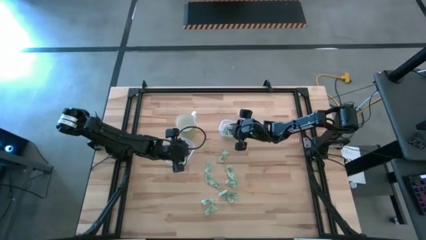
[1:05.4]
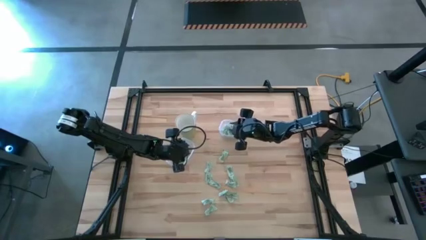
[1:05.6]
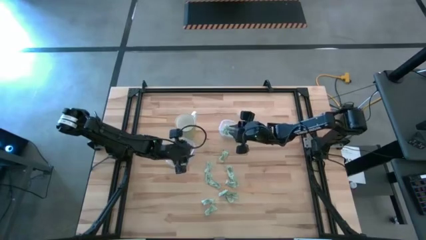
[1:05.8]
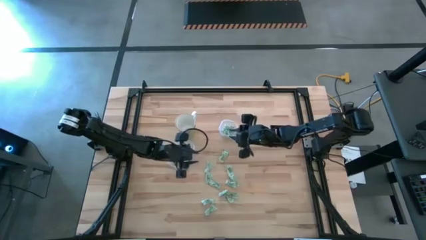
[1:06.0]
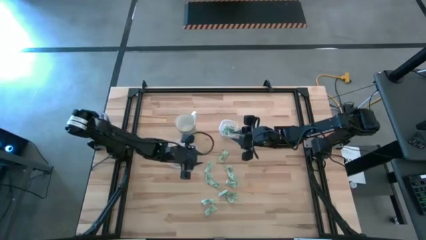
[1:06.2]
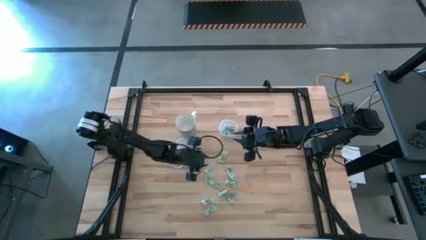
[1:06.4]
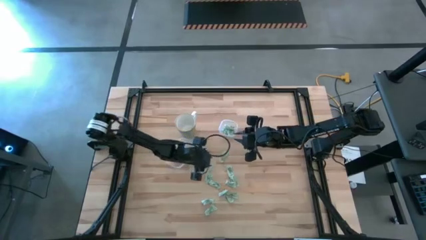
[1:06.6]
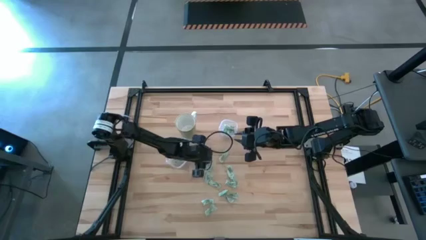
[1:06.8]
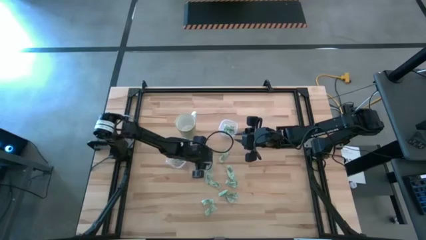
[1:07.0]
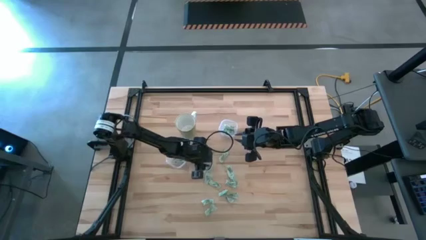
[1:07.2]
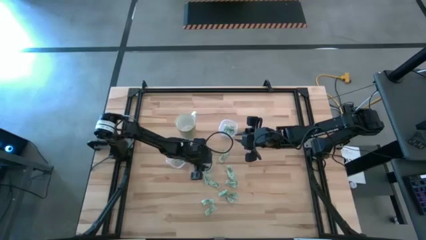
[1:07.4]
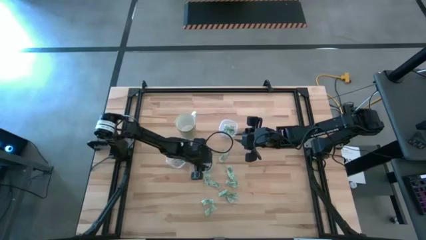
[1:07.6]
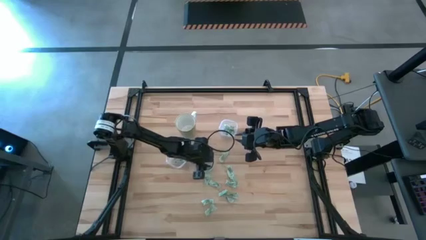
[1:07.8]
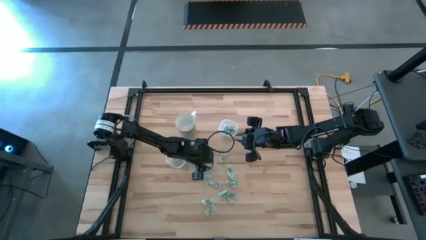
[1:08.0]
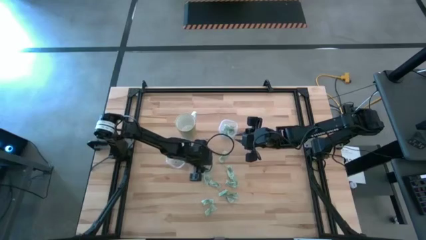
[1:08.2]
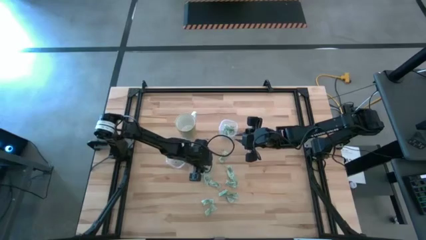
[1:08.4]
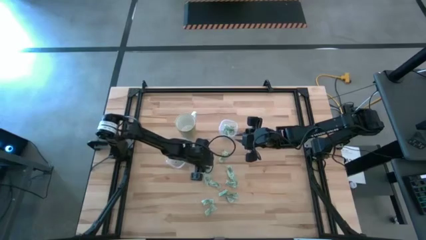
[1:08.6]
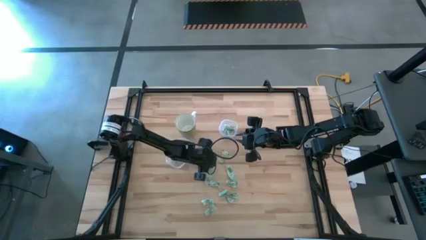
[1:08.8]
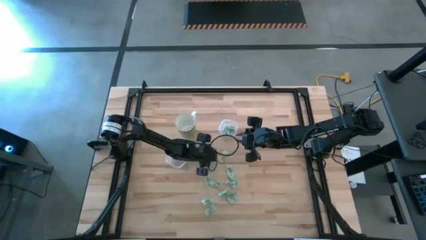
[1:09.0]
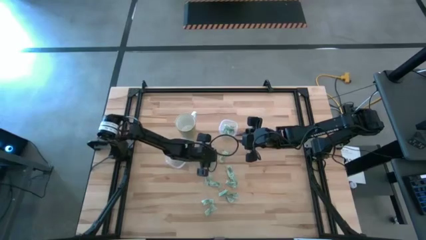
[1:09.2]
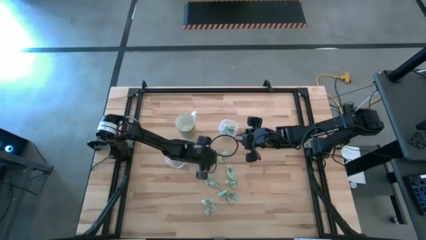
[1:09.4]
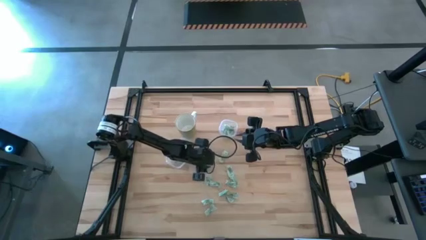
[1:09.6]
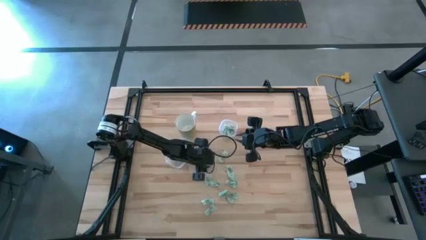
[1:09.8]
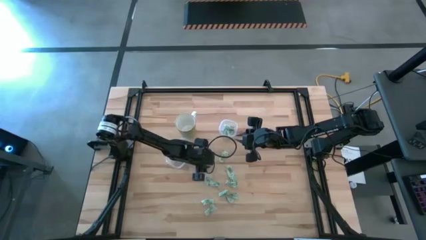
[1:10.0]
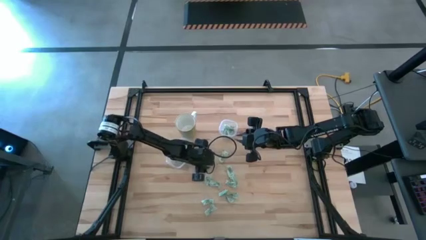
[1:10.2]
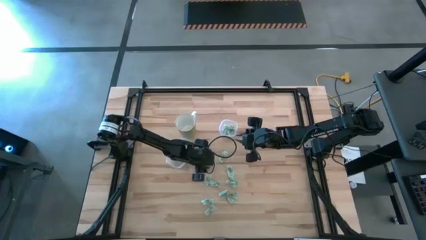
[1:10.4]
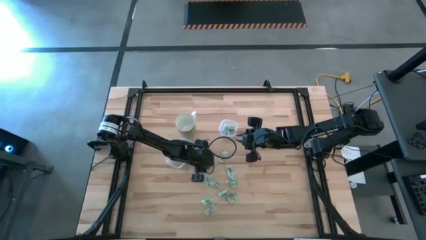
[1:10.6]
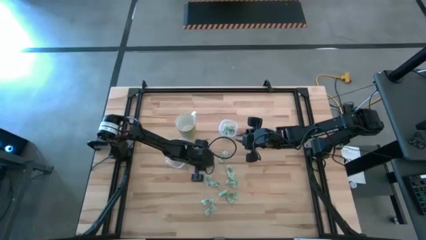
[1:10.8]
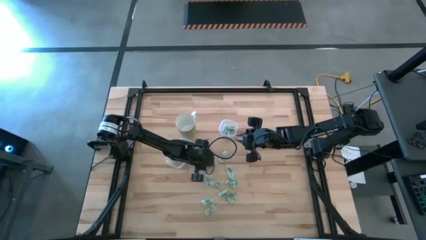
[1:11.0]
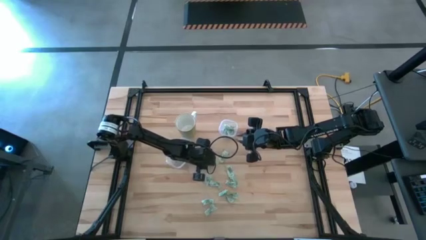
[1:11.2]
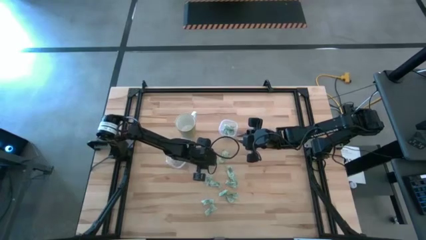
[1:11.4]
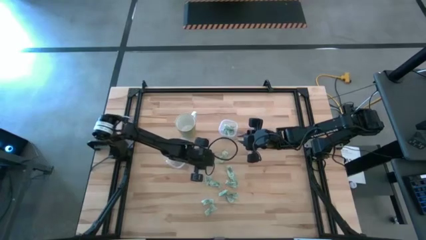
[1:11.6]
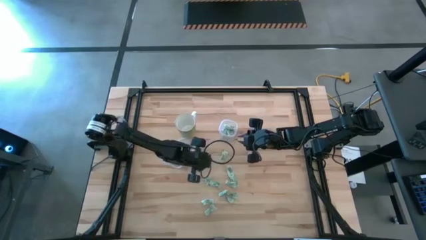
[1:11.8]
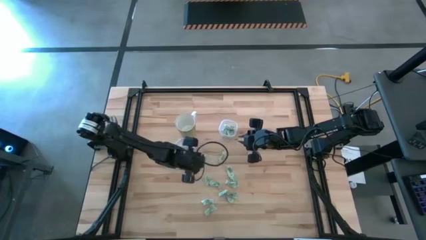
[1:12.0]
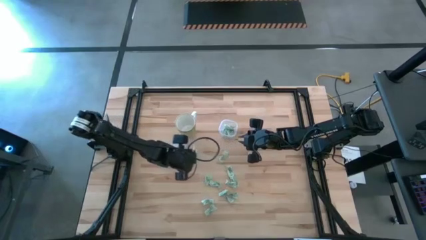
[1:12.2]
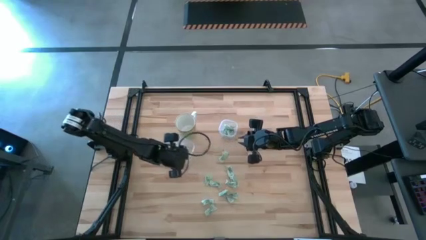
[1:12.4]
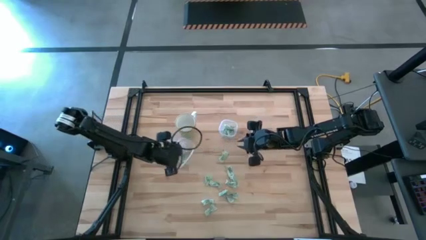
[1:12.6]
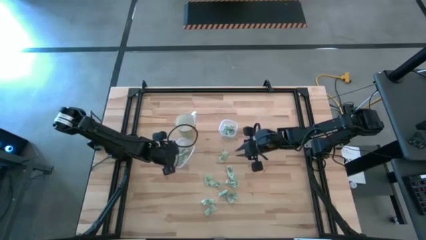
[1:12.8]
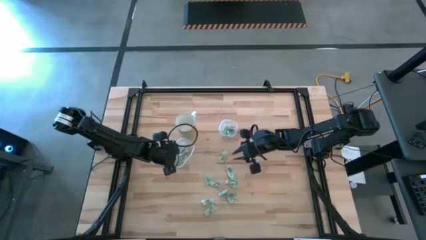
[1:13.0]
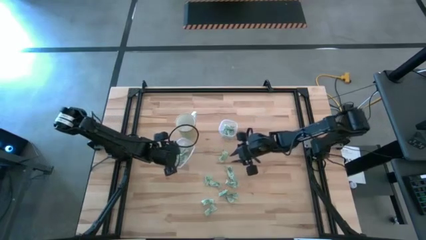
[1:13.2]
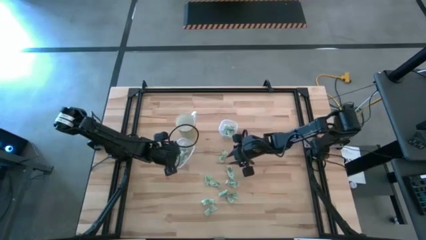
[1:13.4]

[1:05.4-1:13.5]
Task: Pick and place items into bin
Put the stevia packet into the bottom transparent bin

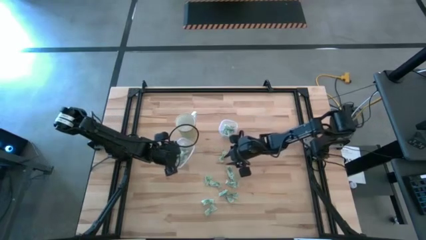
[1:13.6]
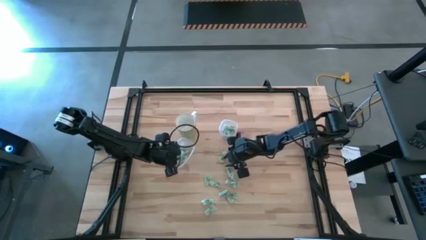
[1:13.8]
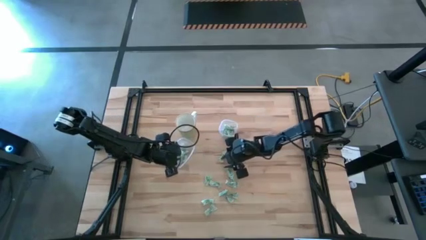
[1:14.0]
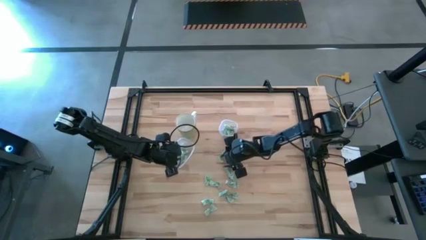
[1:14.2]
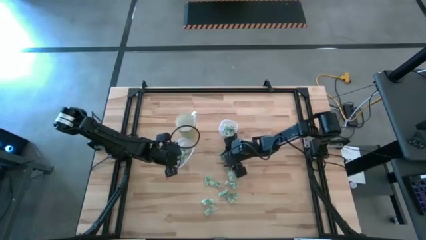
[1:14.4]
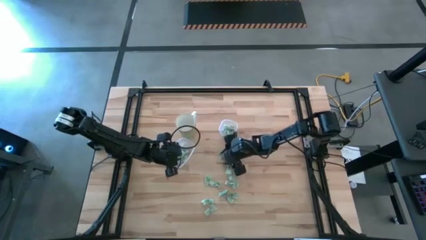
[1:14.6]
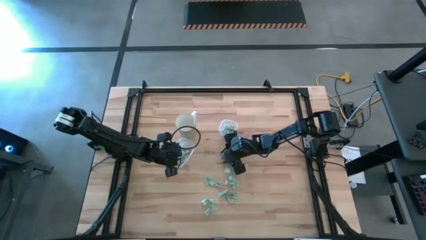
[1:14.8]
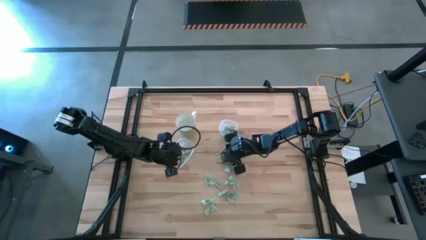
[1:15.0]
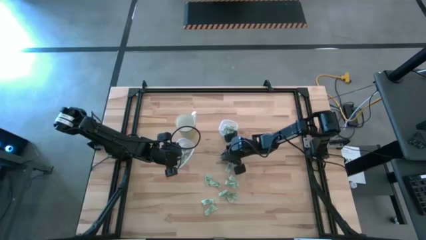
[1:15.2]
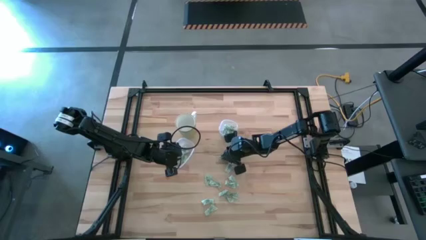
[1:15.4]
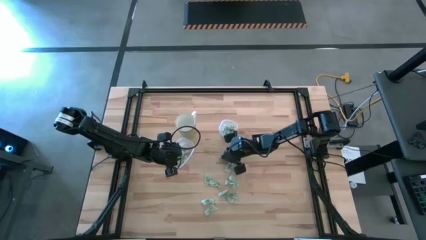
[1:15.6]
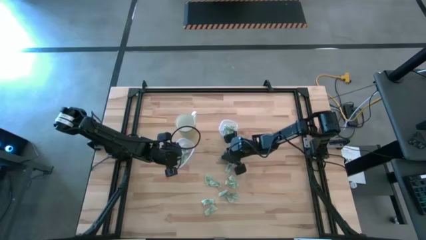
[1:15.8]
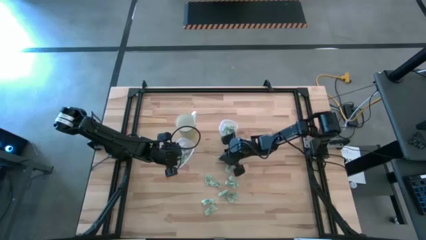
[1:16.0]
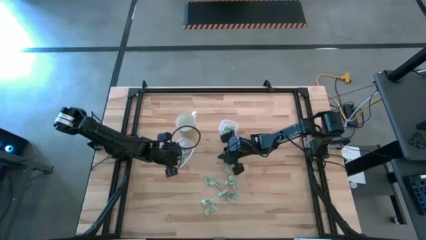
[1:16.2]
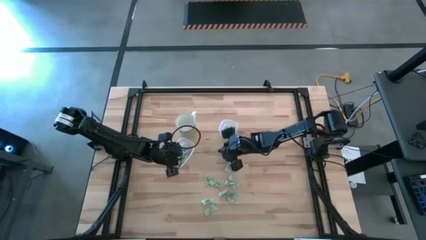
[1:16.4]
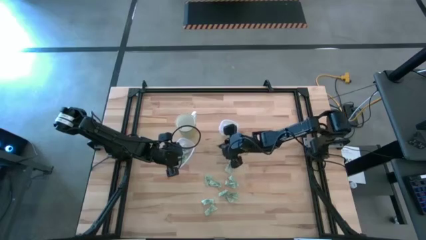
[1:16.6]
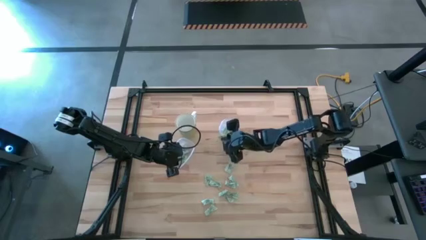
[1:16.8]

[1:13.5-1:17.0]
Put the stevia packet into the top transparent bin

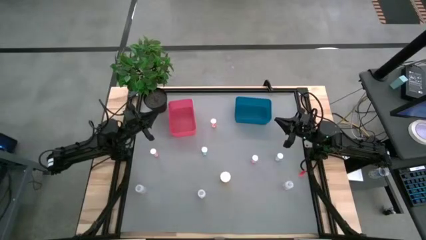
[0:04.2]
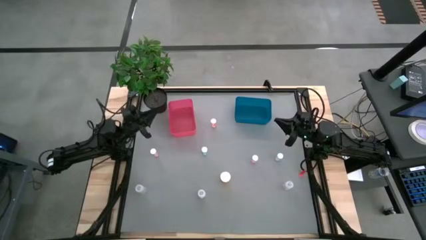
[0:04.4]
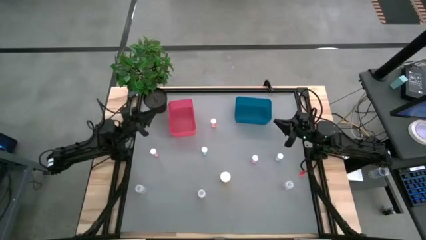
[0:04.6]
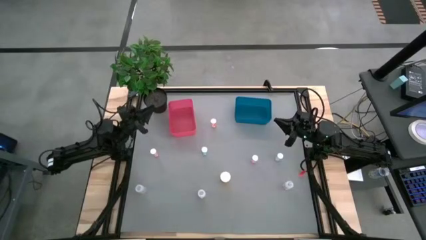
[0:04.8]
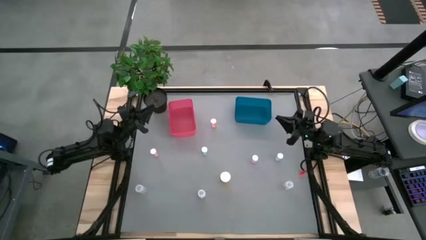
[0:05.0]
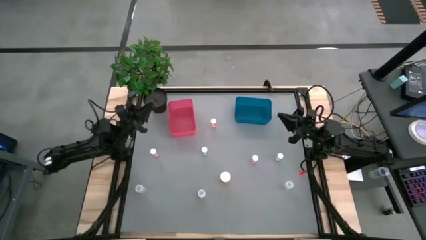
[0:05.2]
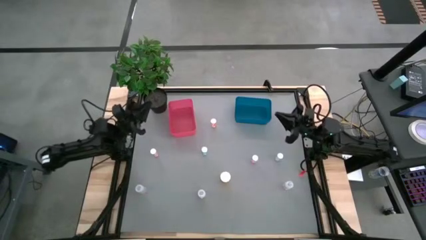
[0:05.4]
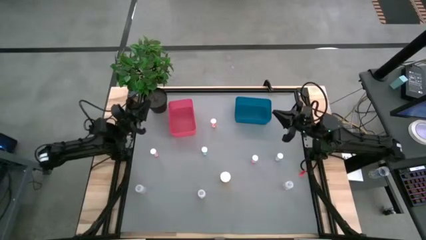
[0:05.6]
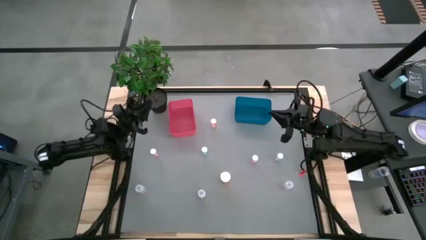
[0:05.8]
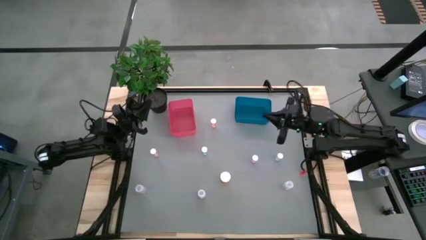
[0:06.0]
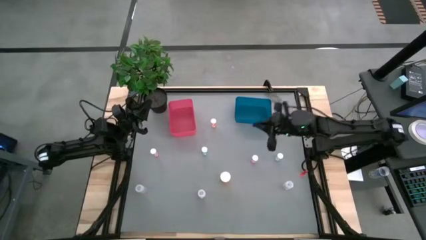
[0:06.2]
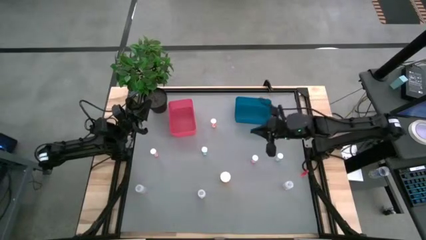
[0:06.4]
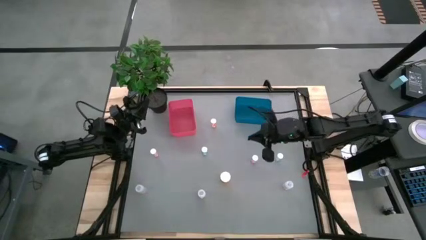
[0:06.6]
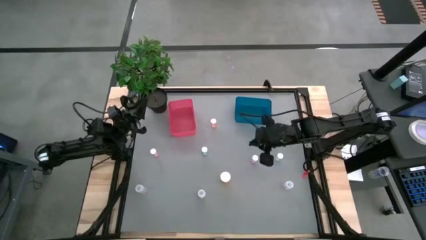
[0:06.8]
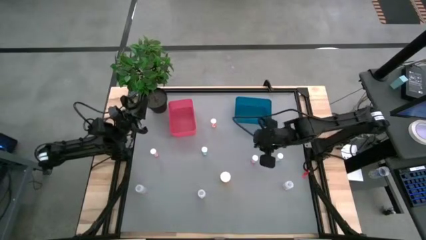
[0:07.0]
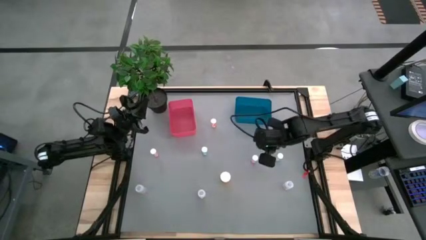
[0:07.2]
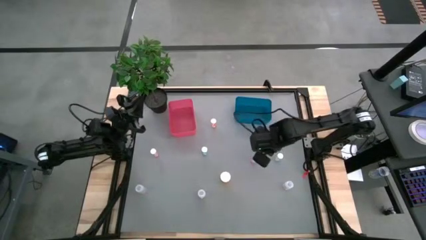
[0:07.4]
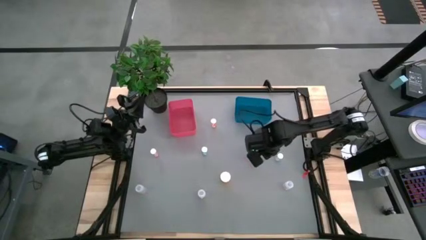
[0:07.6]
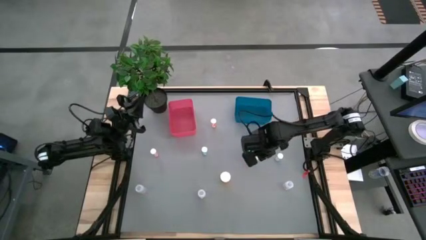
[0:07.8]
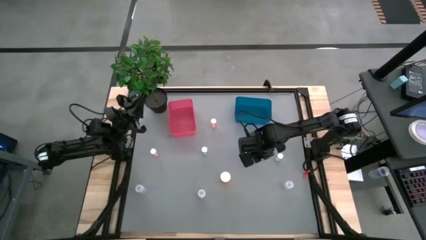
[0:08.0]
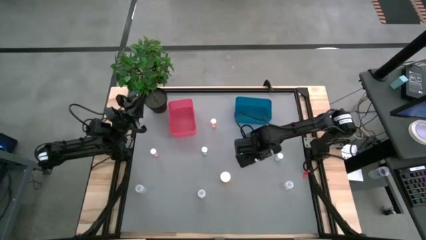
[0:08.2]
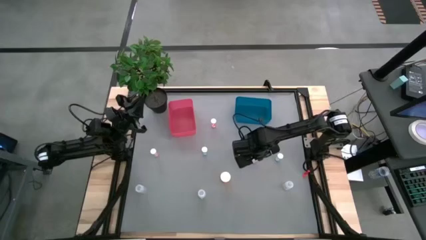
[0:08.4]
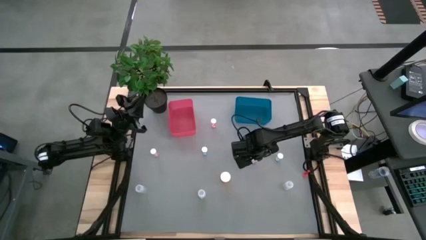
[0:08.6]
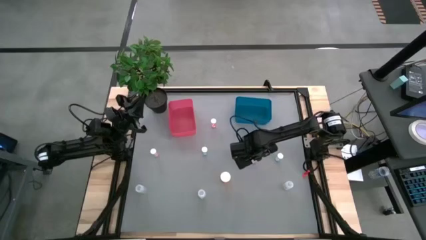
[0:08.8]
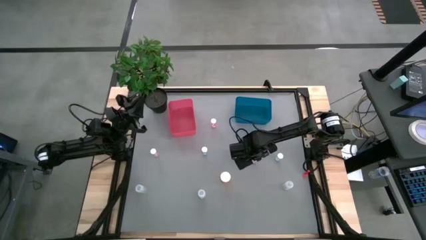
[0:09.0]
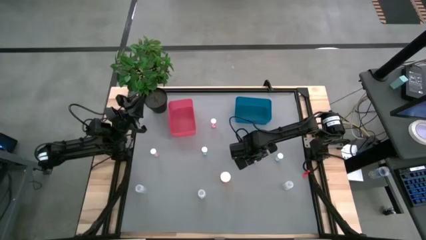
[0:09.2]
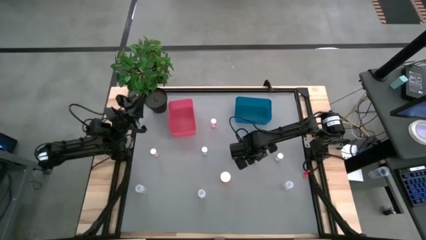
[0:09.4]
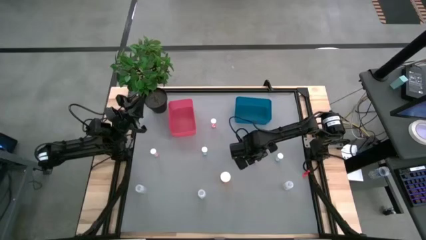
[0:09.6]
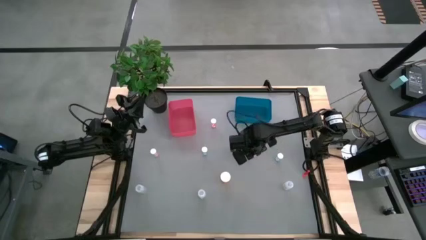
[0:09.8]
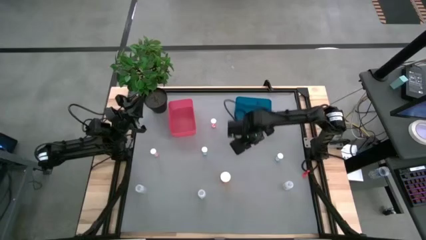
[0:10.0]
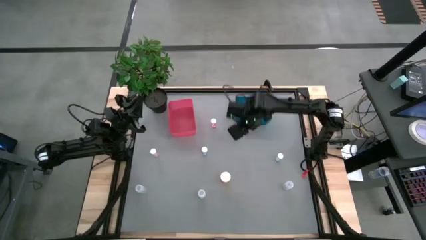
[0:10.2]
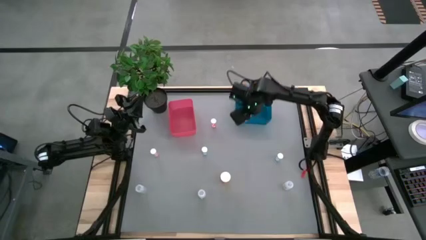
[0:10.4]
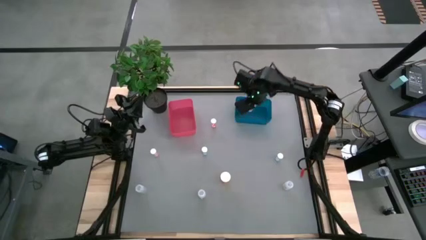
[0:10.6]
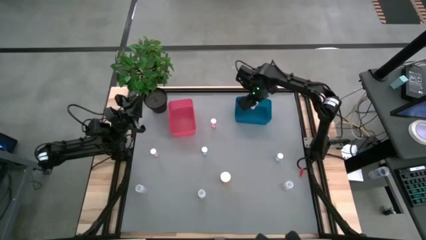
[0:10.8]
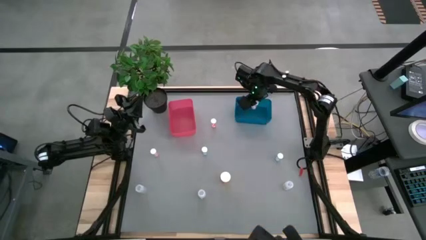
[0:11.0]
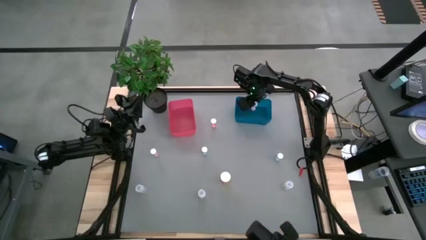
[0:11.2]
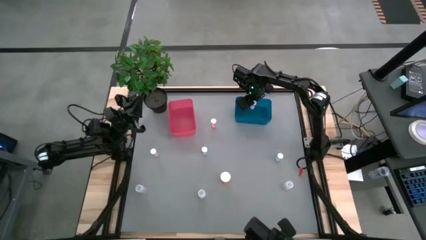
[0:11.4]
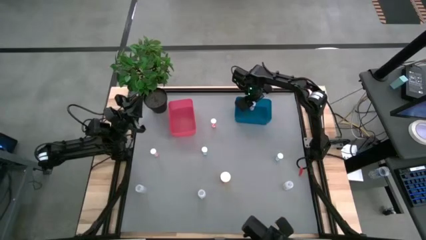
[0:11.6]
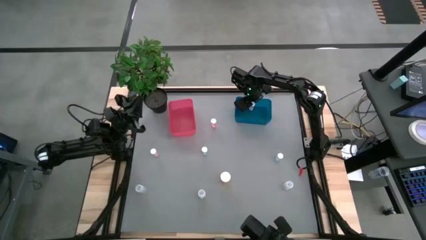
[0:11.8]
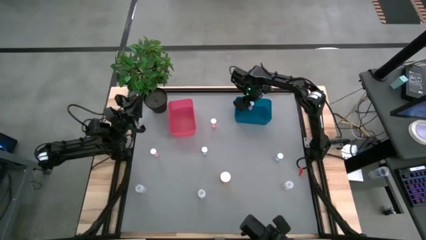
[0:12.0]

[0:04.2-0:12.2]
Task: Pick and place medicine bottles into bin by pill shape (circle, oval)
Put the right purple tablet bottle into the blue bin
